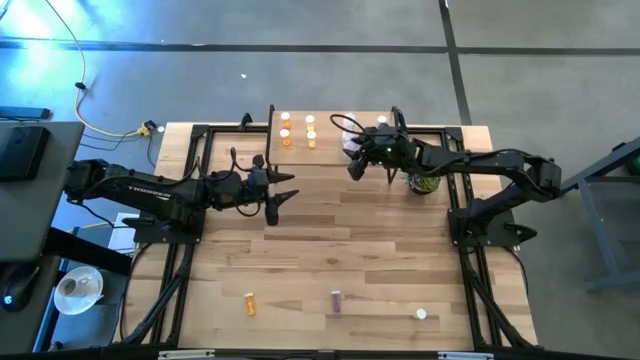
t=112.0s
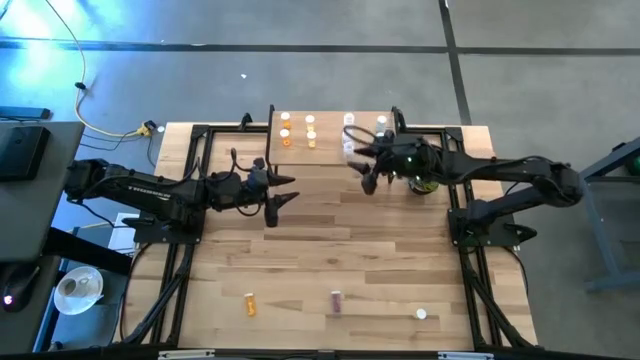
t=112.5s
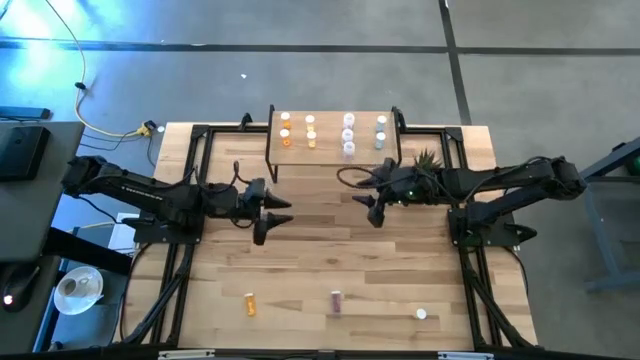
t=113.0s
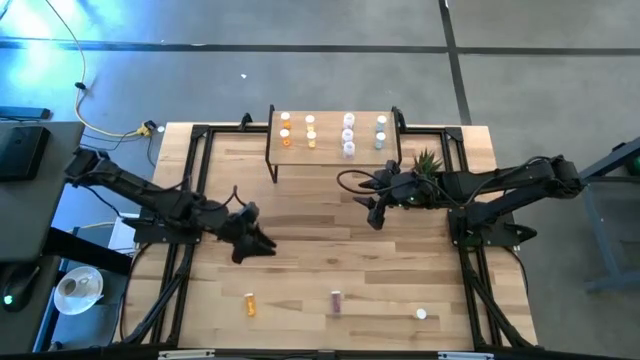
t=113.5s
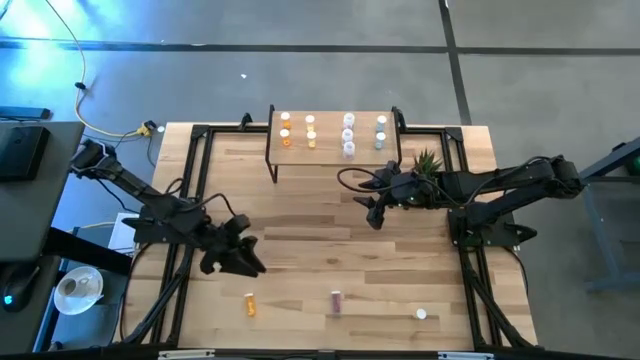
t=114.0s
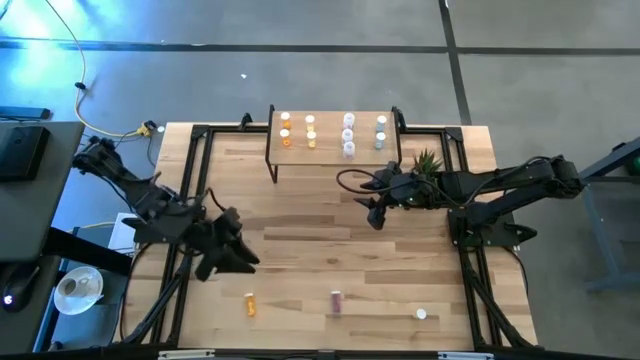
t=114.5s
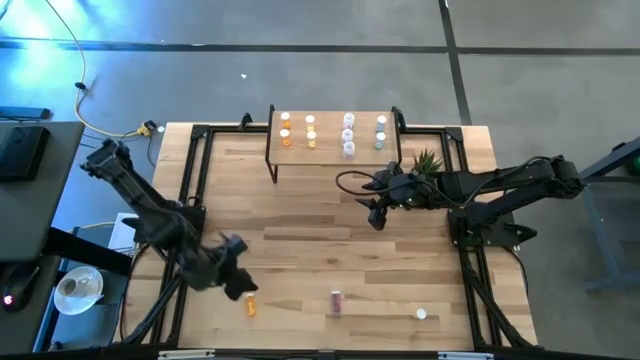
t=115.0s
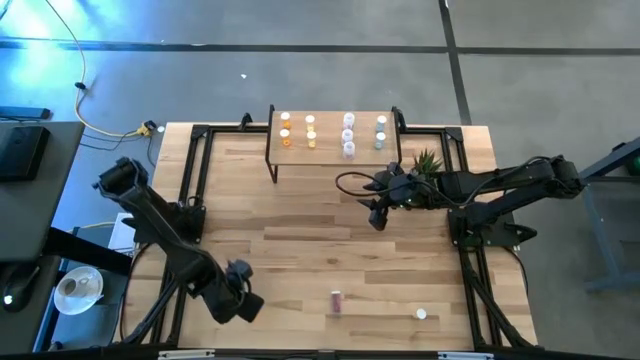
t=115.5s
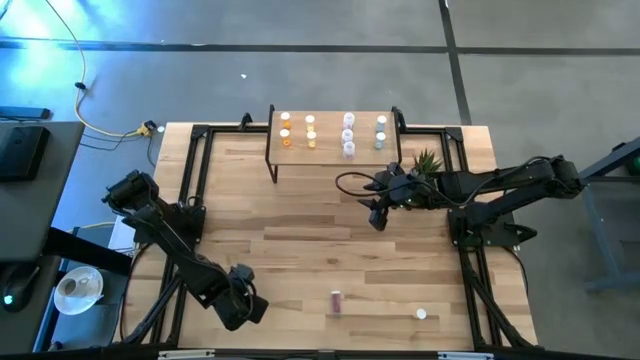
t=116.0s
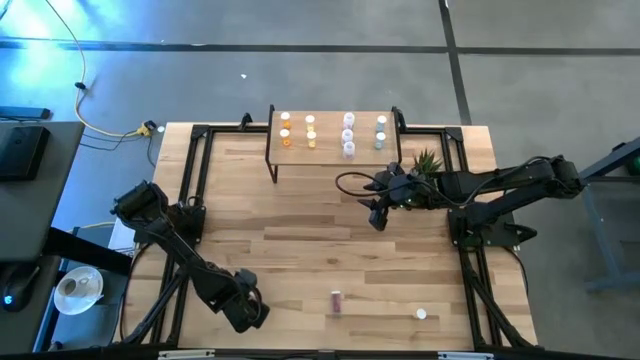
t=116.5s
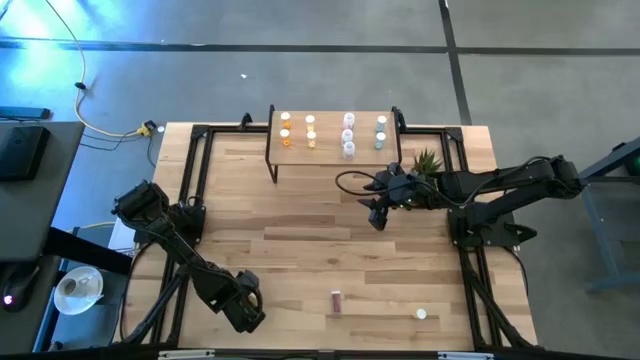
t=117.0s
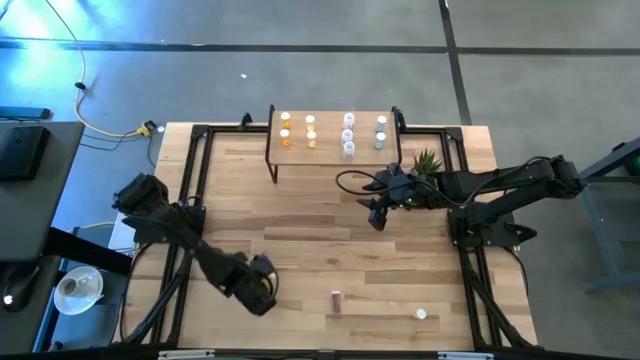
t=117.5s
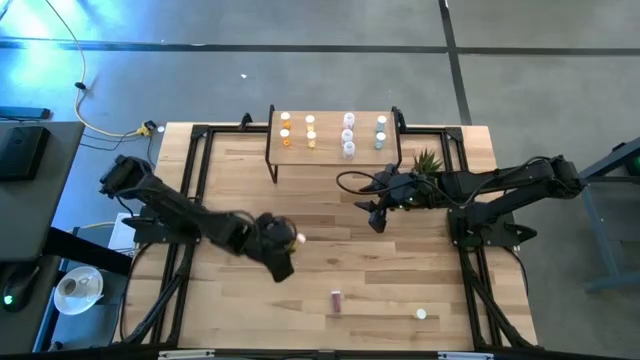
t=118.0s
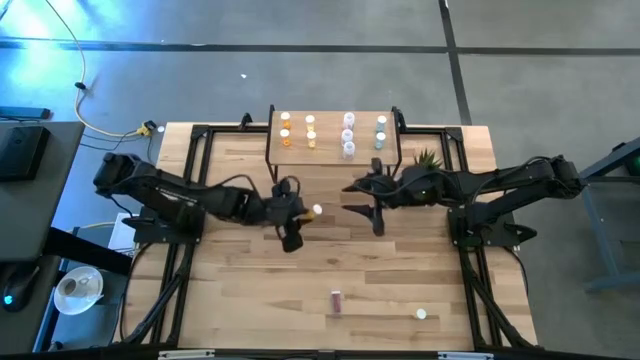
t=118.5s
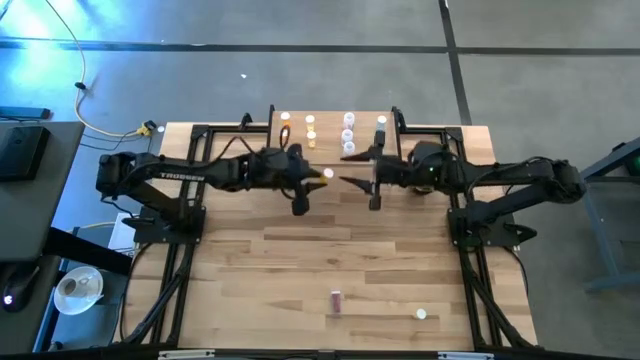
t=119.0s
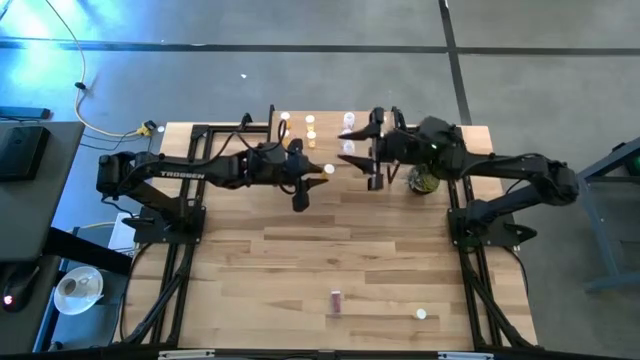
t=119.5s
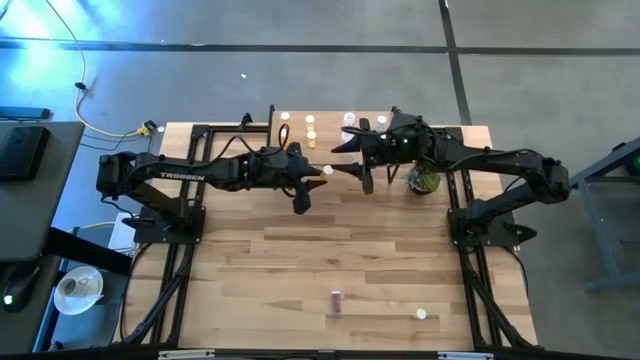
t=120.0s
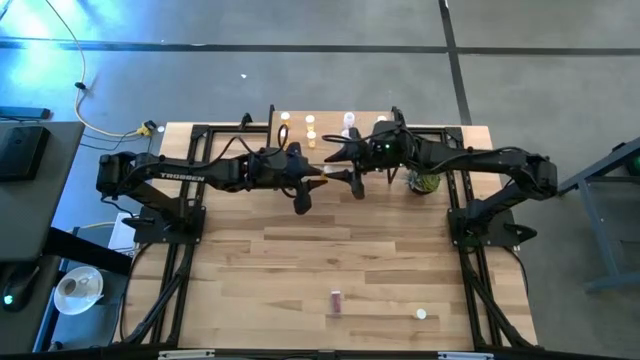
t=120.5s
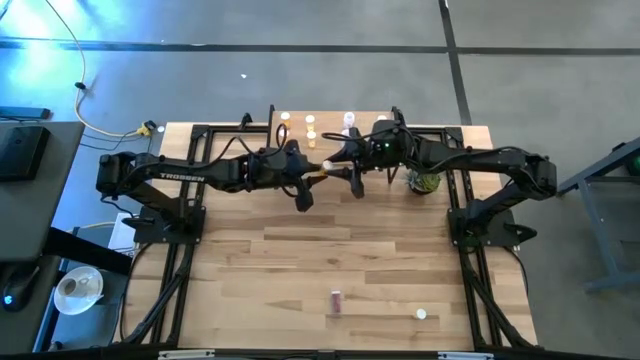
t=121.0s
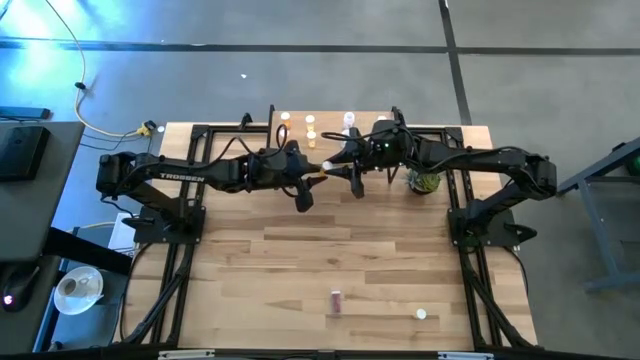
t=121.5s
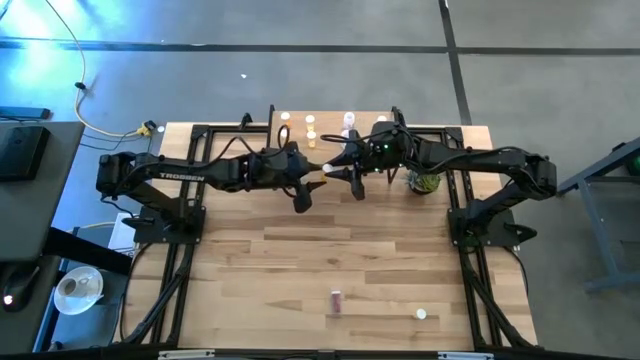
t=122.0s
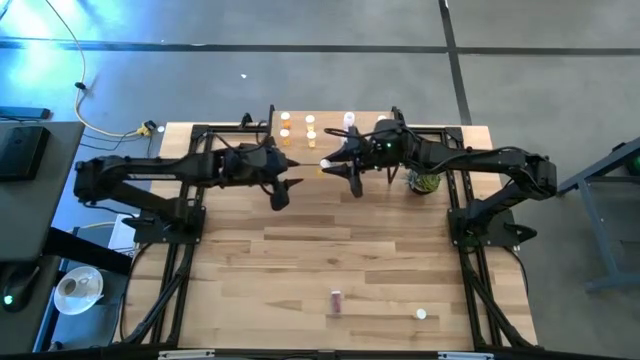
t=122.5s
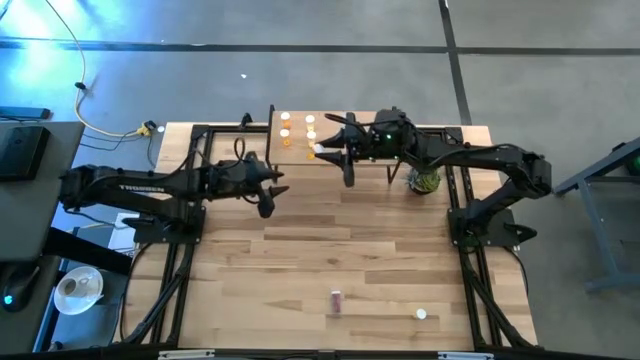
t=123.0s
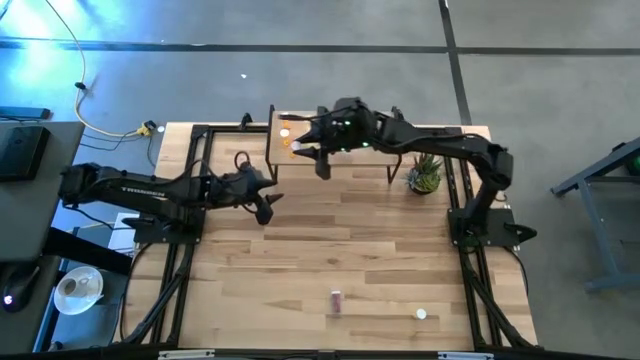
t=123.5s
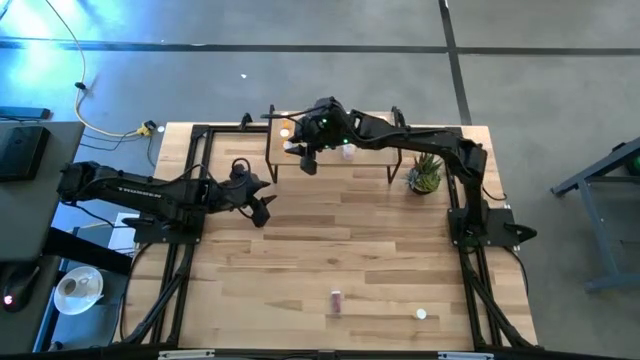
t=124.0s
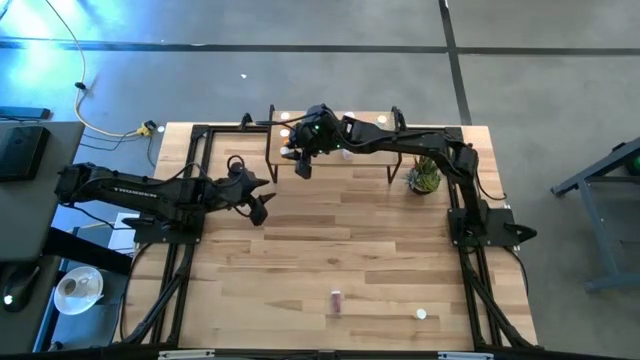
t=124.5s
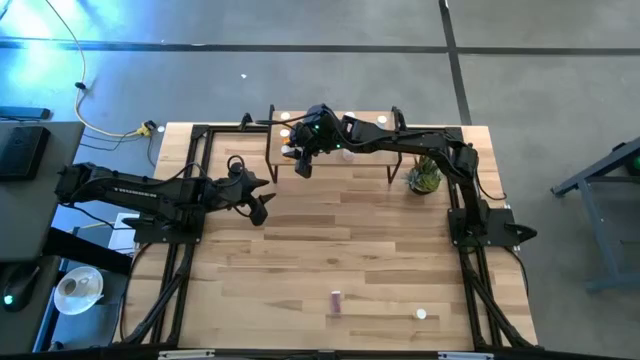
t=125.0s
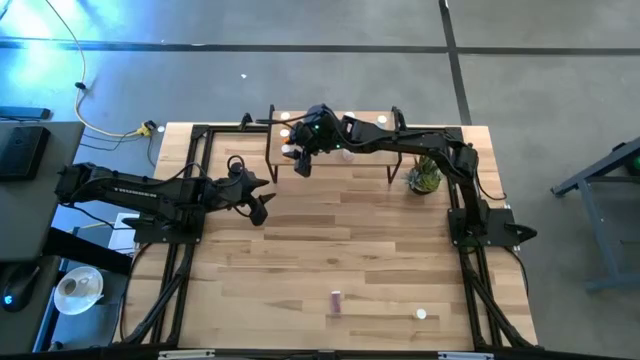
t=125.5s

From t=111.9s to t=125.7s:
Task: Pick and place medicine bottles onto shelf by color
Put the orange pill bottle on the shelf aligned with the other orange pill bottles

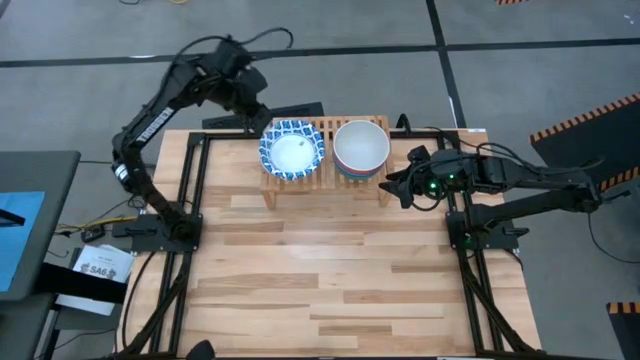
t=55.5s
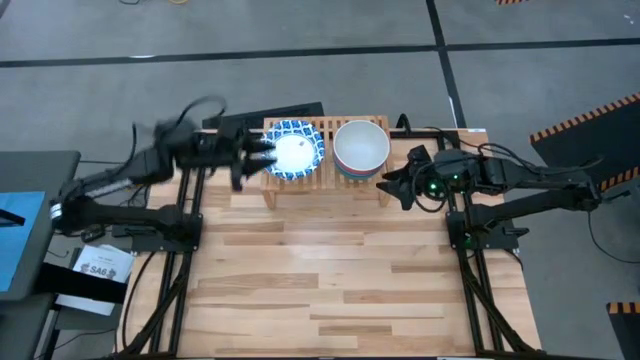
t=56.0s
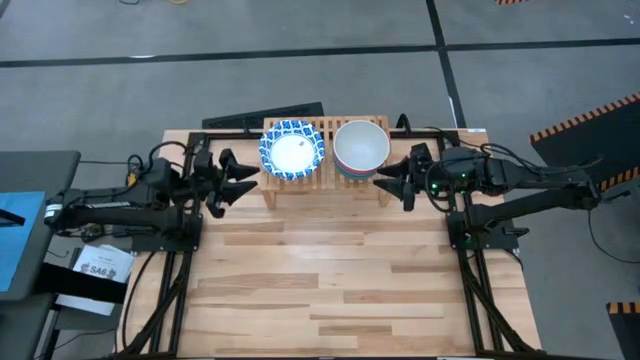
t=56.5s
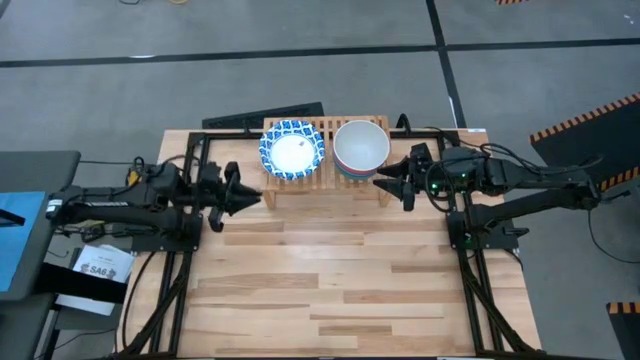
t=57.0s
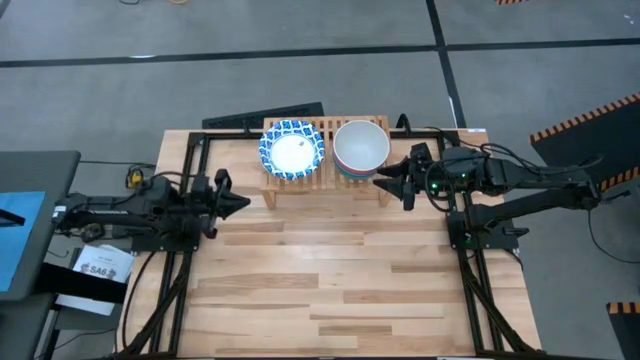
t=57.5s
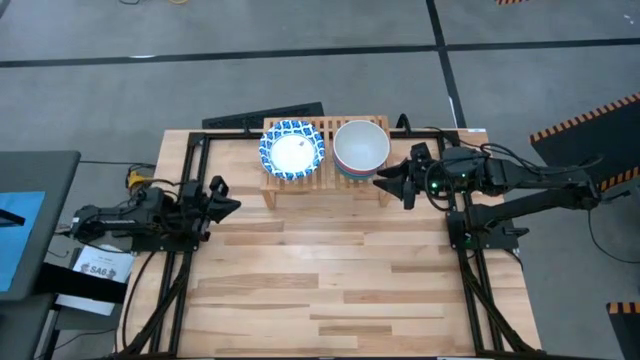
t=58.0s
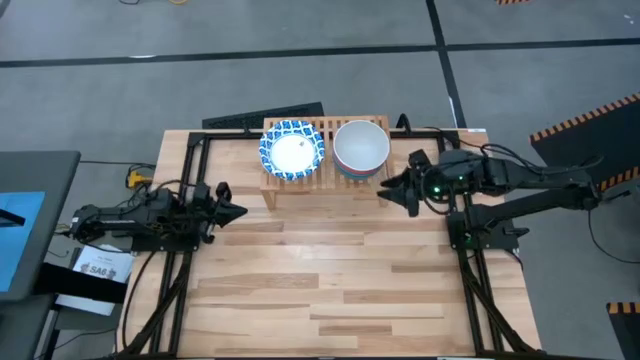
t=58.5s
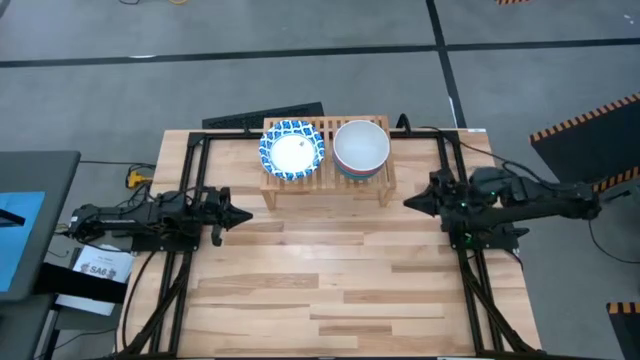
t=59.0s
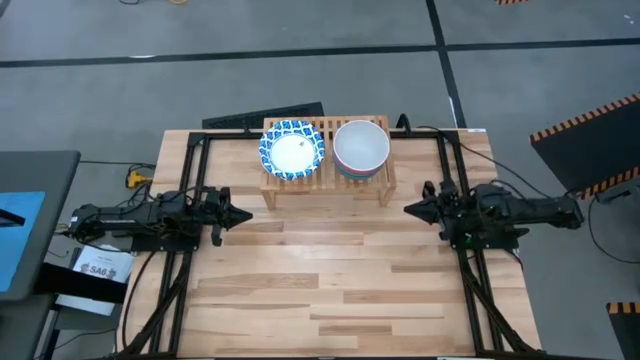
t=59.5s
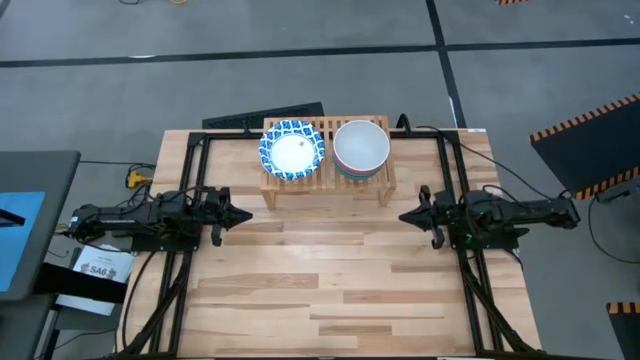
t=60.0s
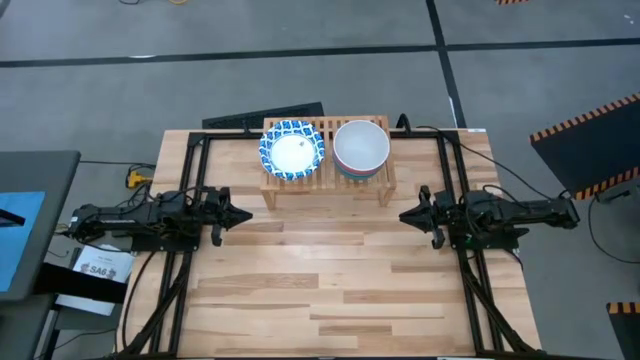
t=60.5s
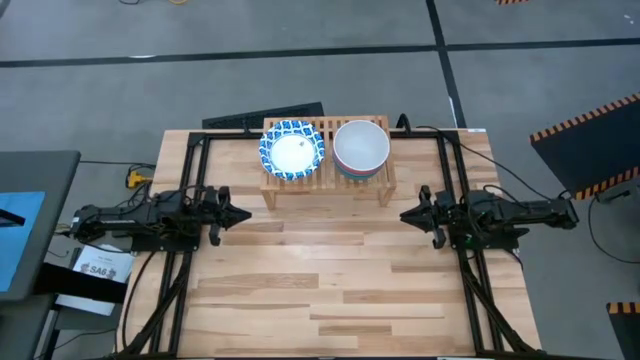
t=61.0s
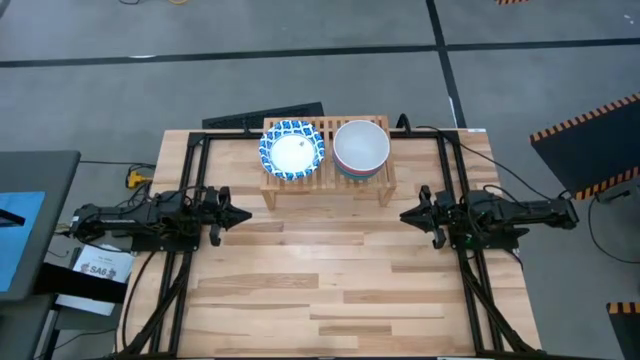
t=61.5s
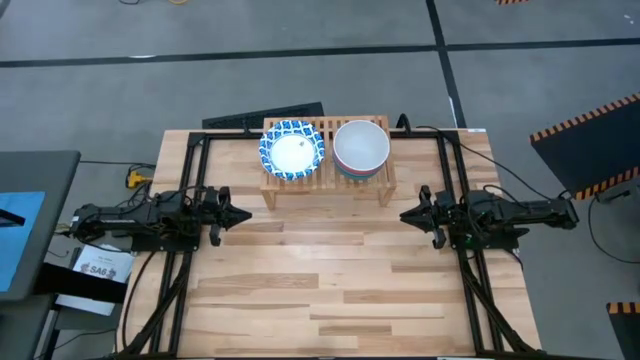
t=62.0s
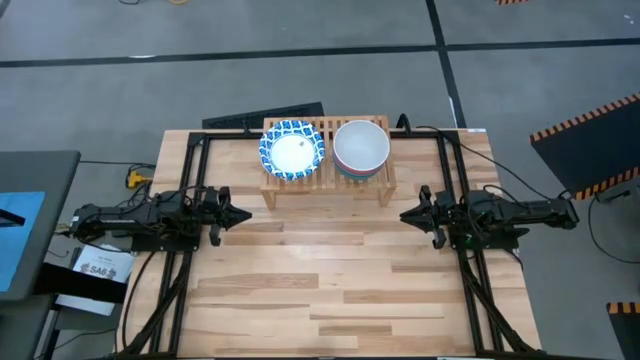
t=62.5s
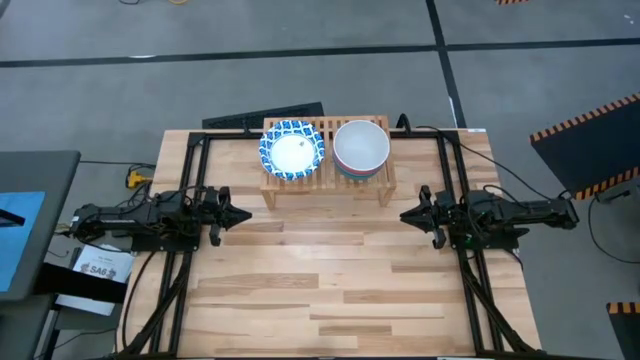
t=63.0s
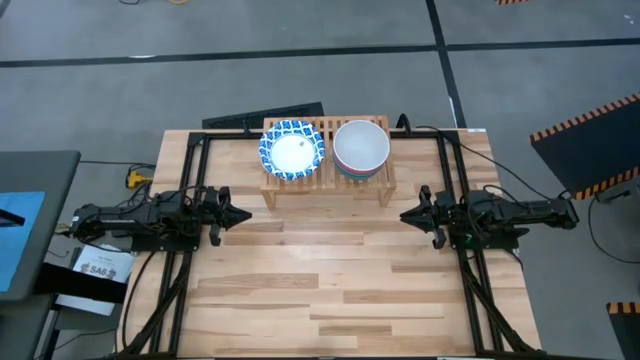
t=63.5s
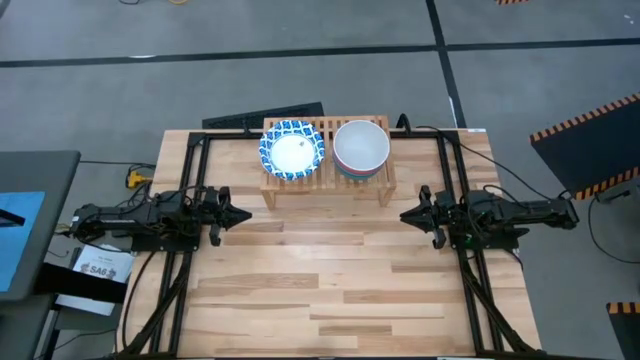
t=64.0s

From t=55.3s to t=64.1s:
Task: Place and stack bowls onto a shelf
Return to home position
